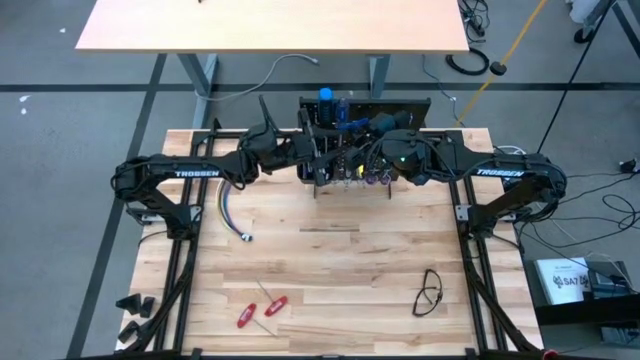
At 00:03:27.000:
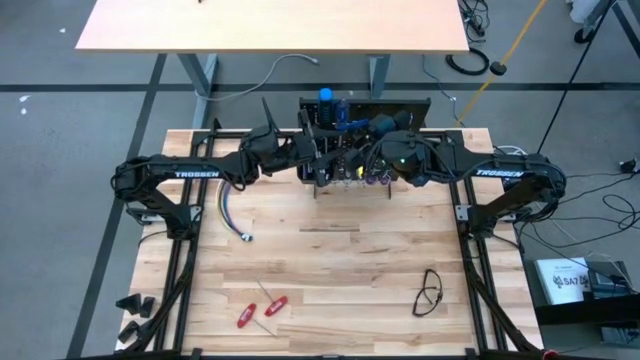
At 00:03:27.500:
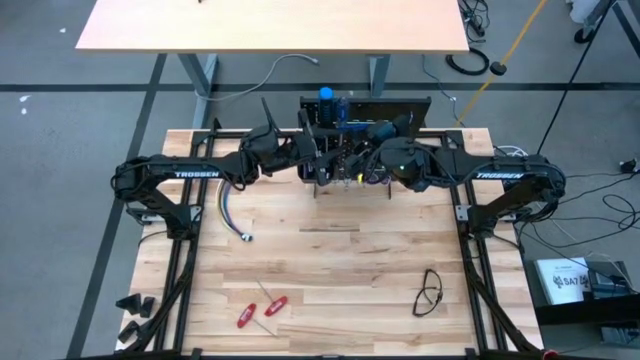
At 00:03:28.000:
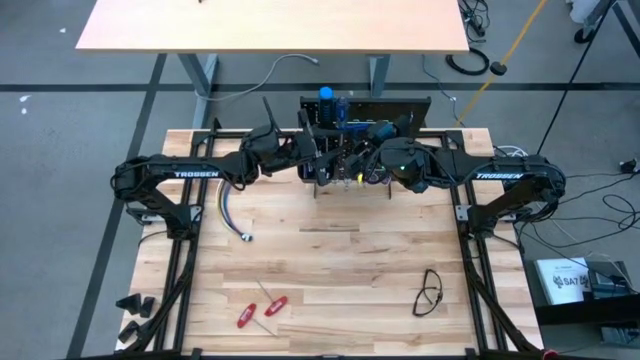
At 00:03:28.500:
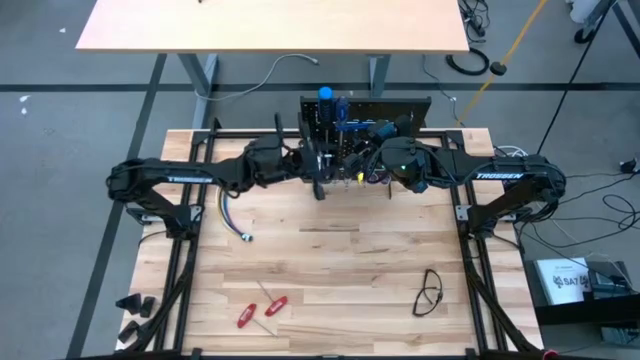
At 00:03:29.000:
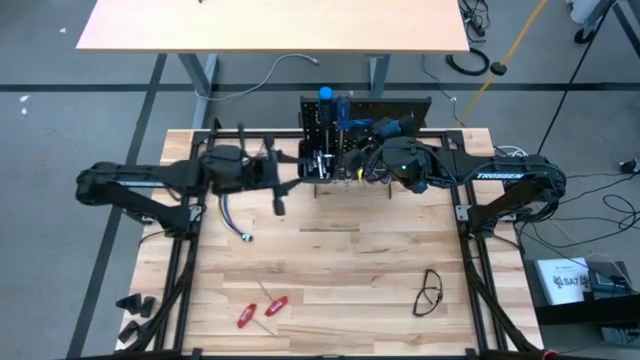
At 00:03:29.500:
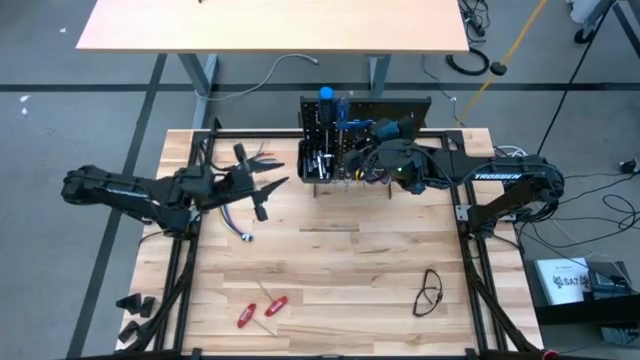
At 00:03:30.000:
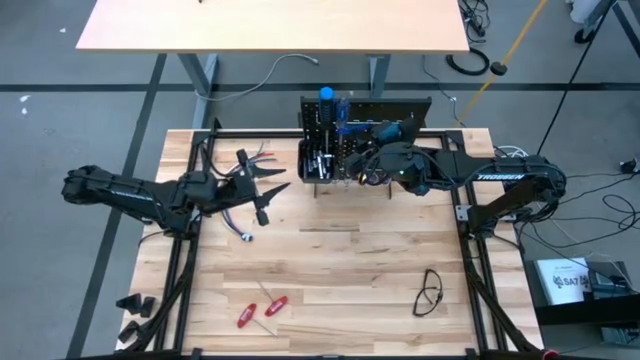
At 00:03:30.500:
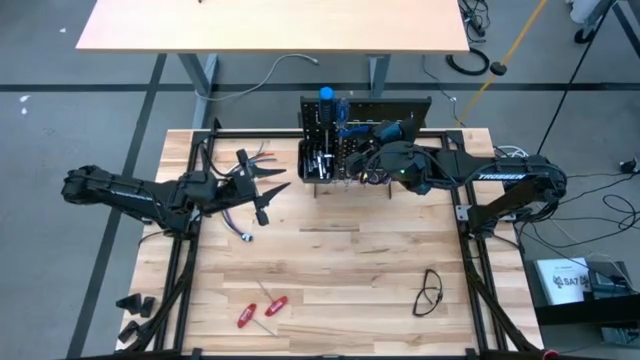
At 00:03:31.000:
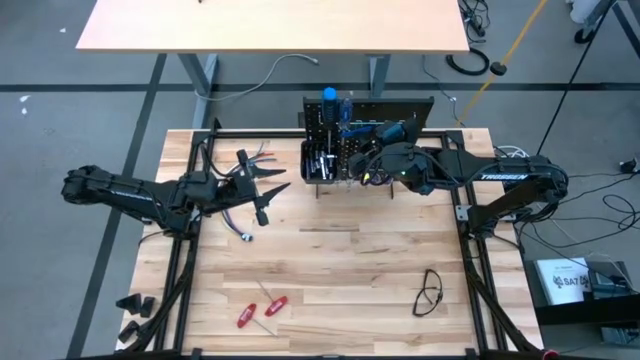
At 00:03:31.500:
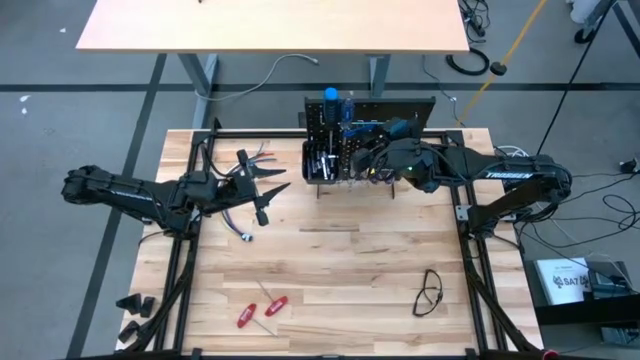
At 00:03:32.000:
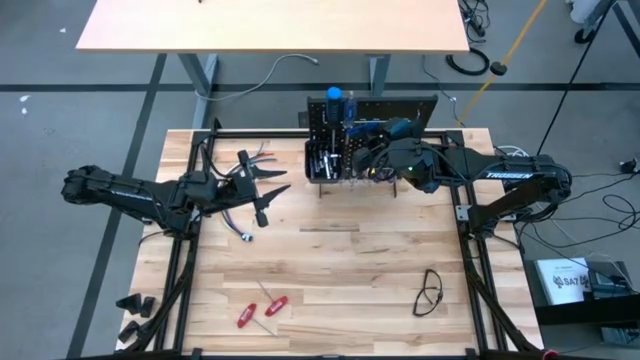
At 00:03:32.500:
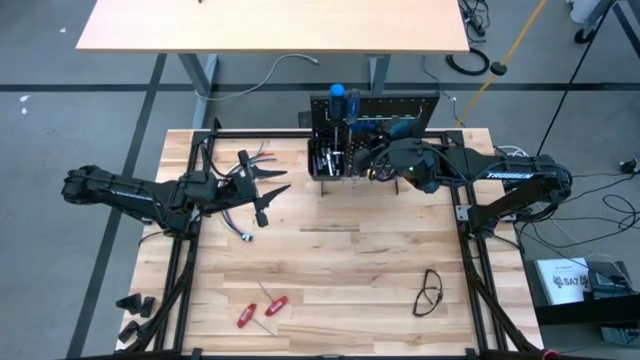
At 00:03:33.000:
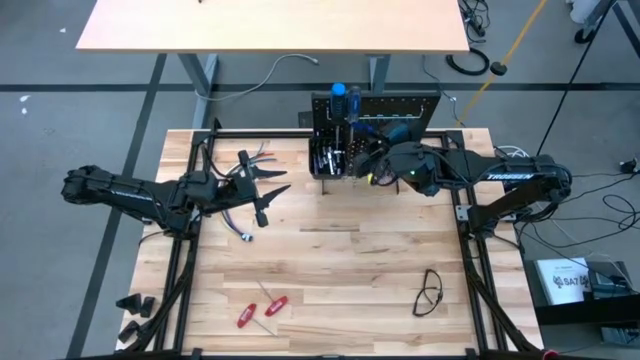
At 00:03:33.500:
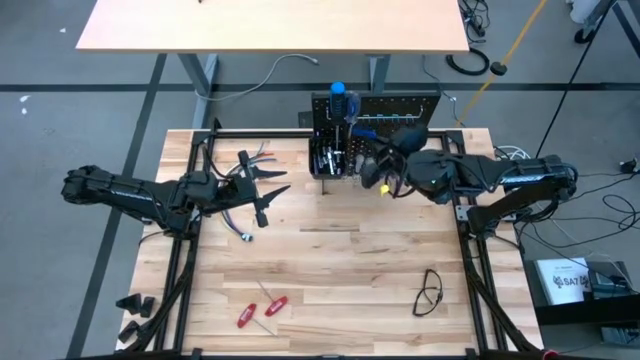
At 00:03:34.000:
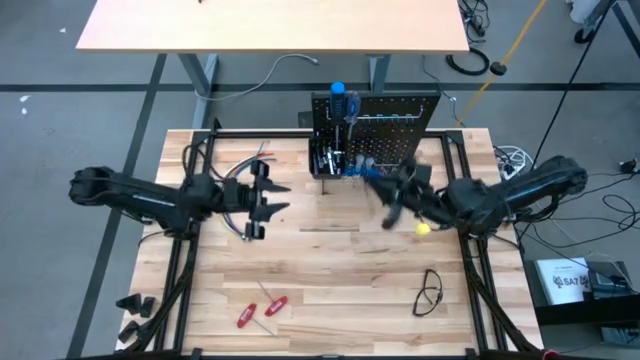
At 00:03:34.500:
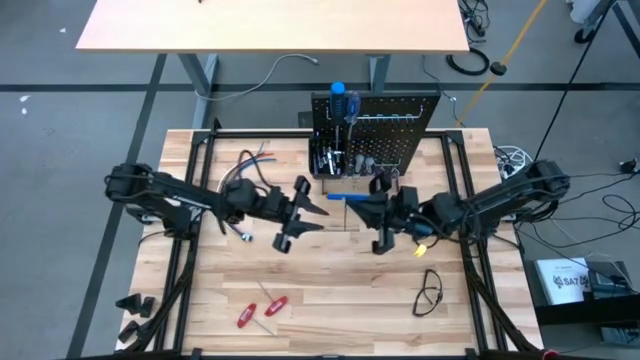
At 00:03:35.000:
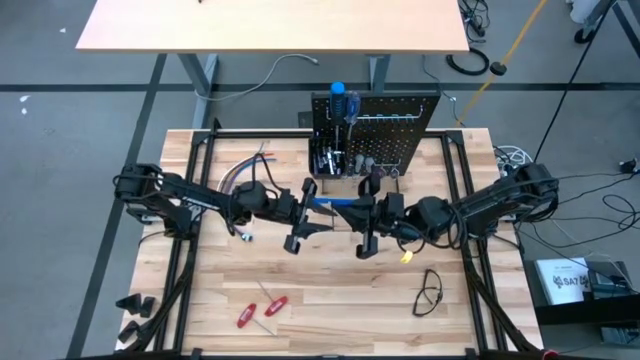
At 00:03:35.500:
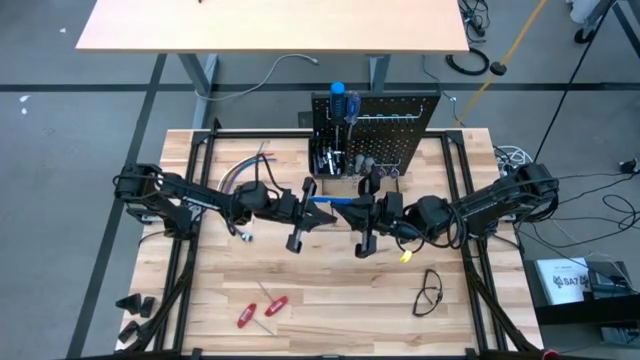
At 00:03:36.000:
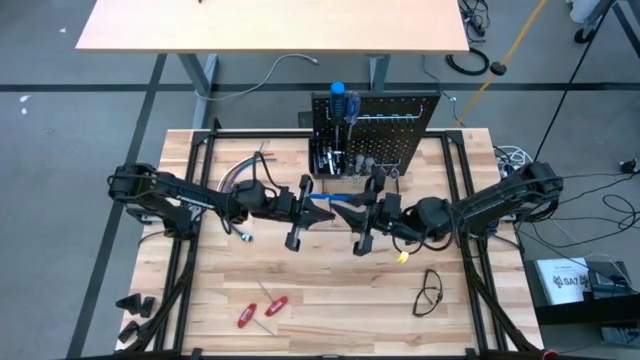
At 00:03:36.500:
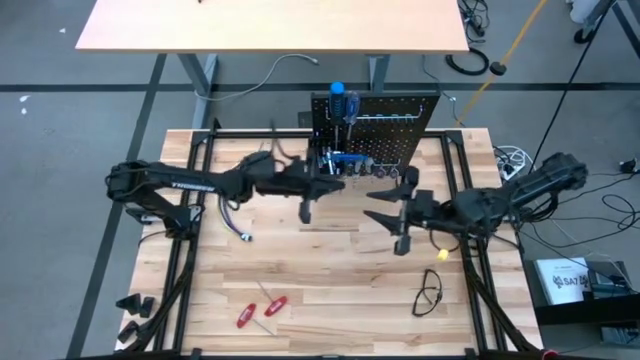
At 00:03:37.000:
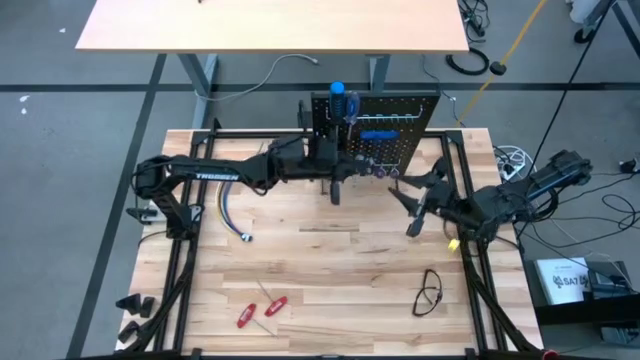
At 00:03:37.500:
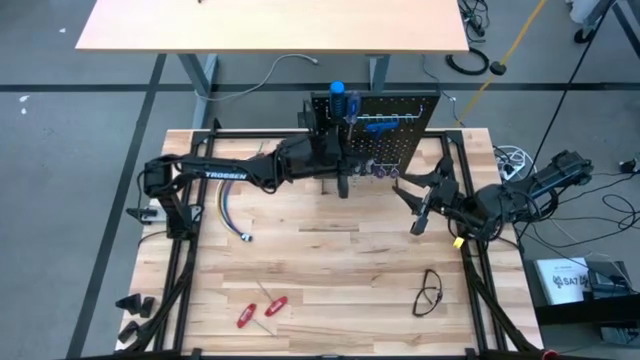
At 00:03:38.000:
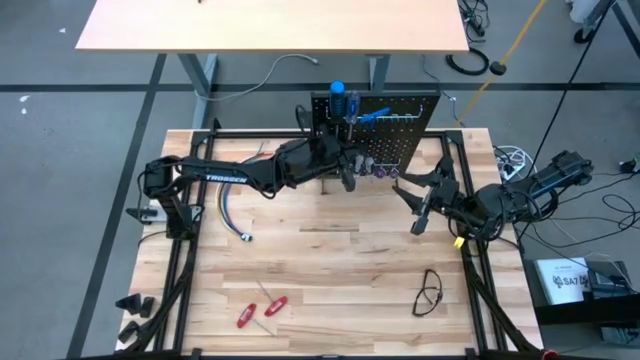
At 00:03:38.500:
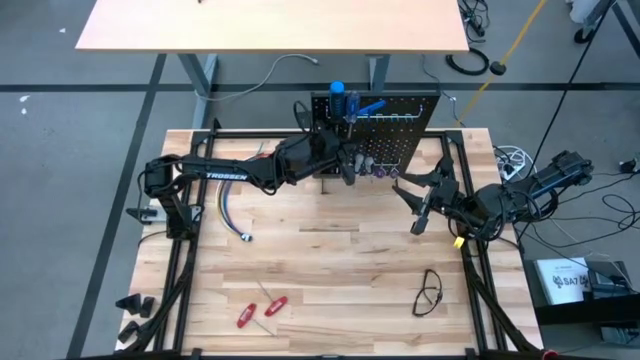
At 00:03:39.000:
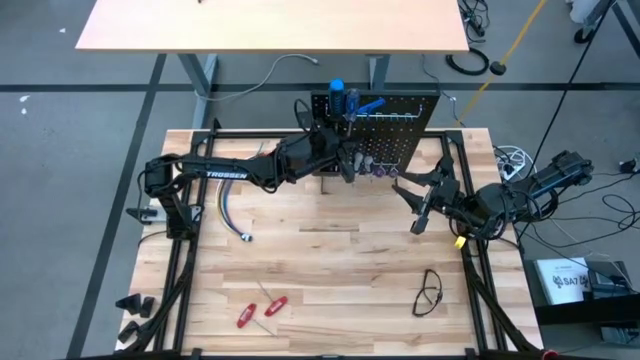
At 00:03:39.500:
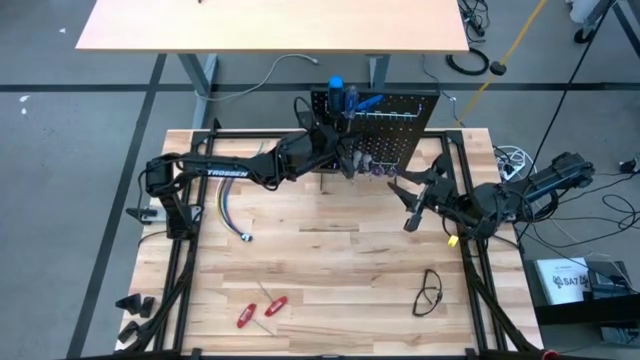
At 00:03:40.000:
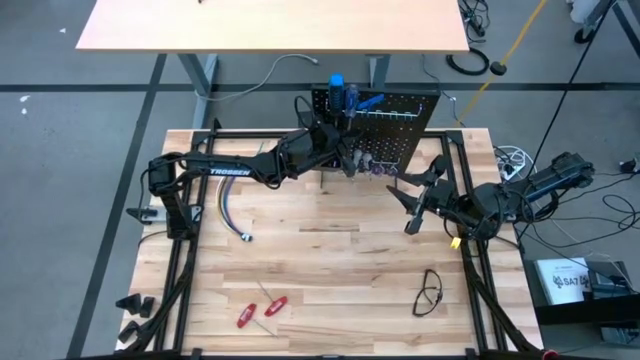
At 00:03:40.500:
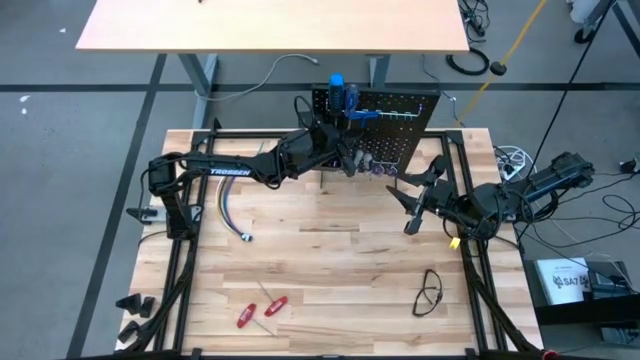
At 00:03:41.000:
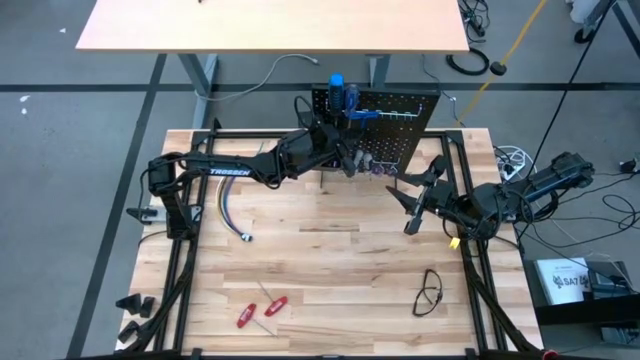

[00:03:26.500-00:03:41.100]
Task: Hang tools onto peg board
Hang the blue pick tool on the peg board

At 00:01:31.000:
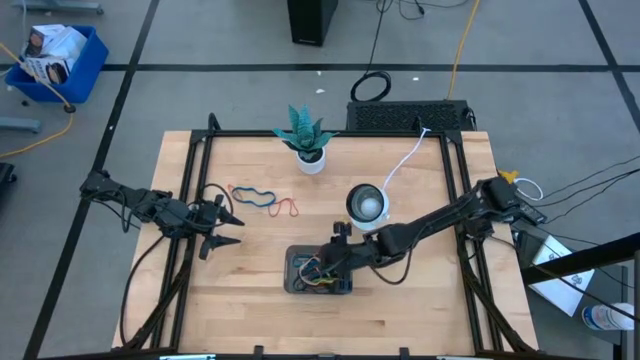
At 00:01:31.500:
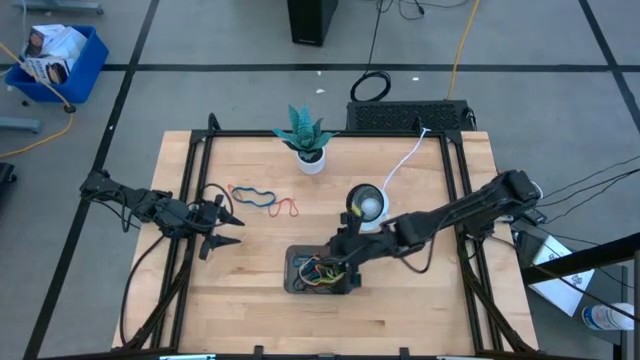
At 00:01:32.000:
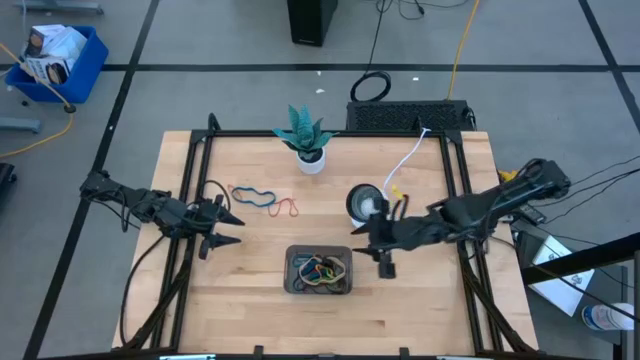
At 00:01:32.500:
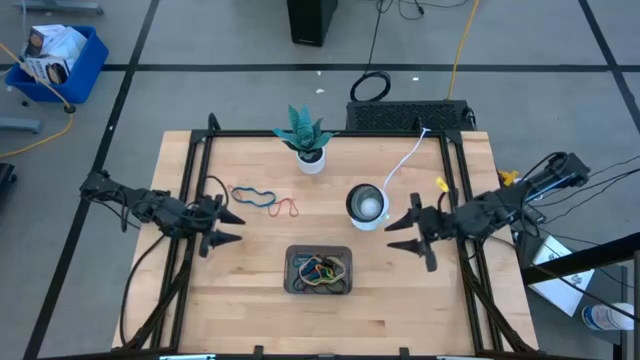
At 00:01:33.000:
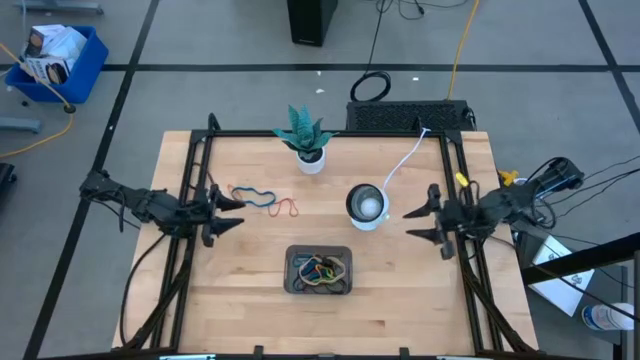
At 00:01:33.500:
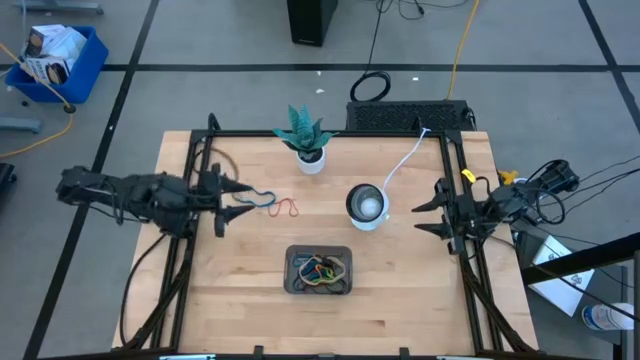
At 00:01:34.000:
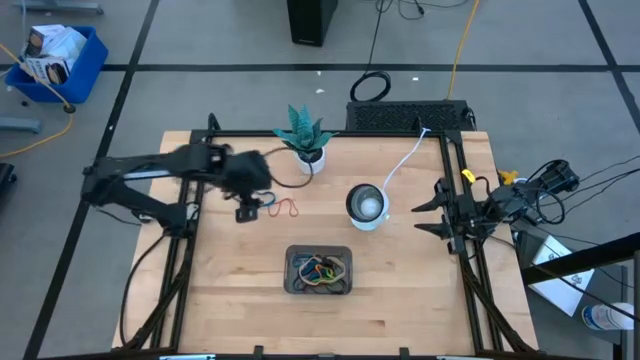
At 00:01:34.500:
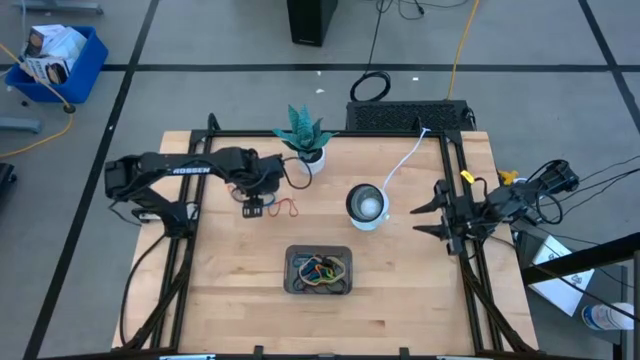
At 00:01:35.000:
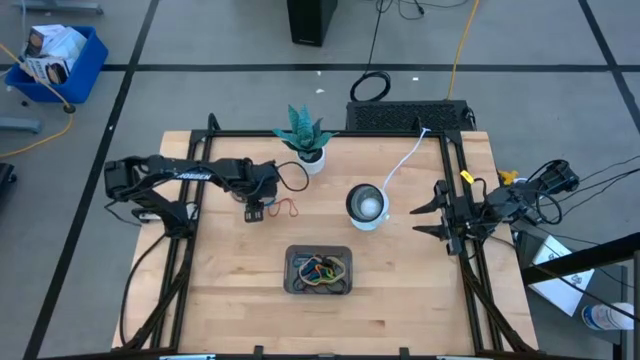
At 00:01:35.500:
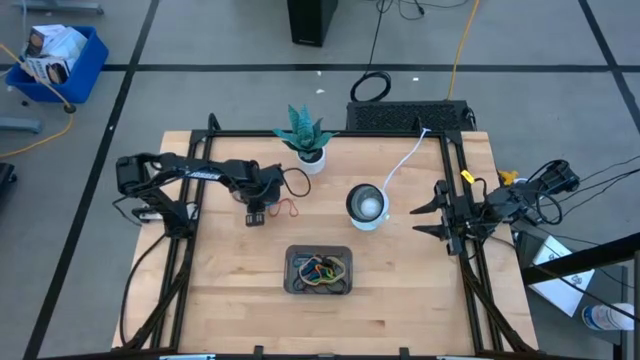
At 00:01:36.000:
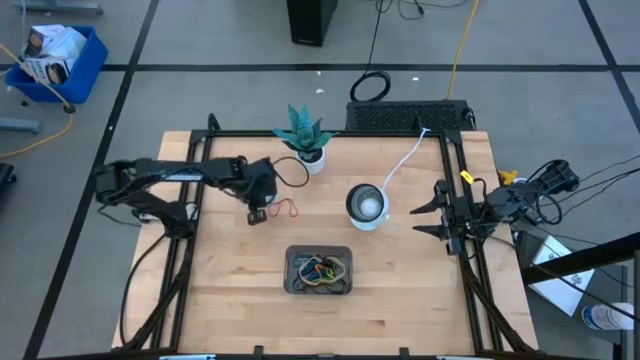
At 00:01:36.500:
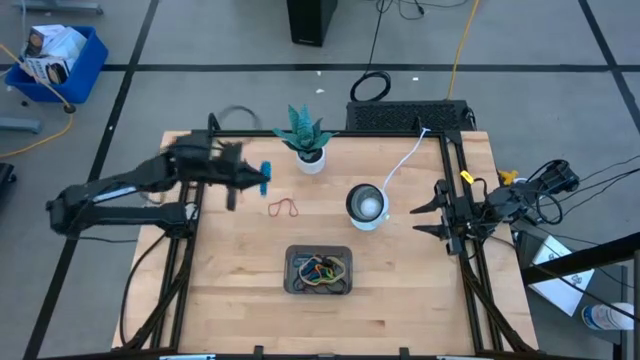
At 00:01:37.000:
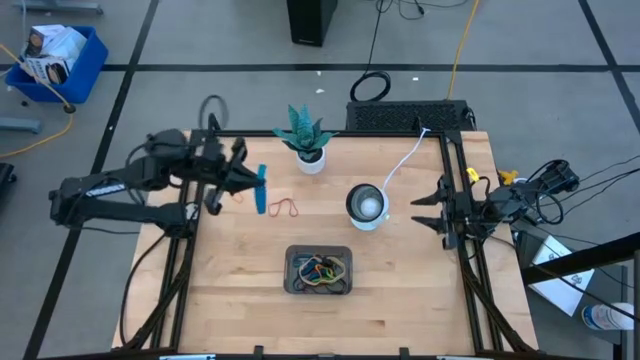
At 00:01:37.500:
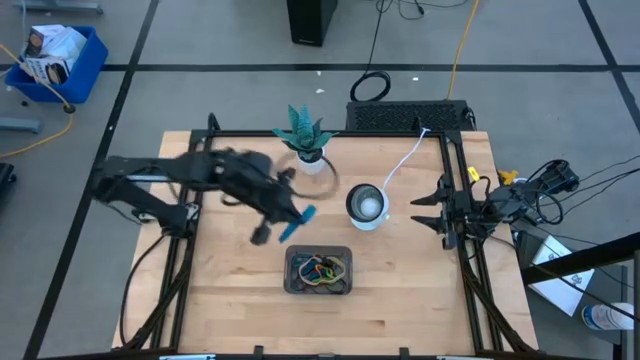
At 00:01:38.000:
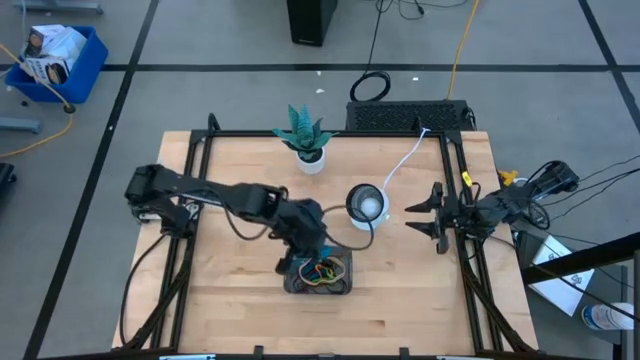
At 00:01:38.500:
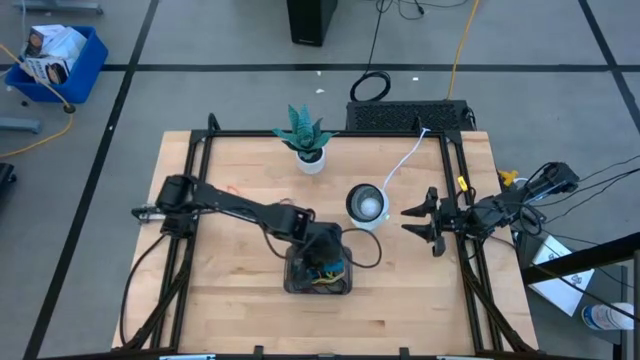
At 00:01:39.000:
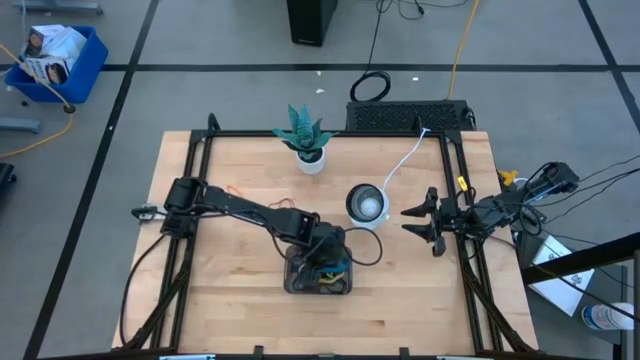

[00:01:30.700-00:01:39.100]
Task: Pick and place rubber bands into bin
Put the blue rubber band into the gray bin
